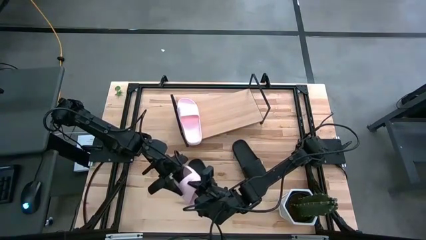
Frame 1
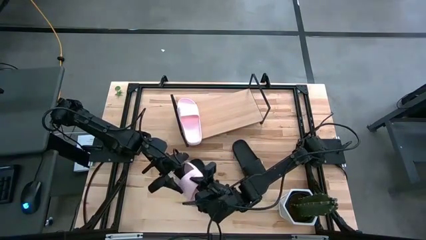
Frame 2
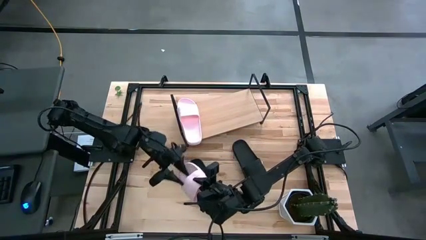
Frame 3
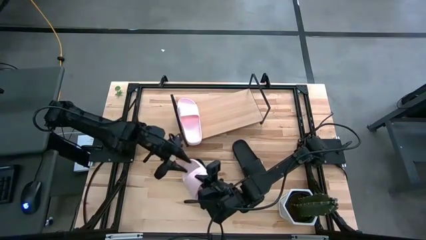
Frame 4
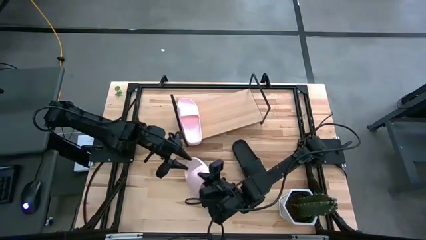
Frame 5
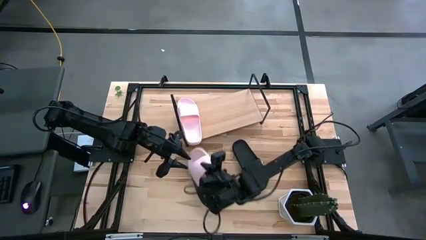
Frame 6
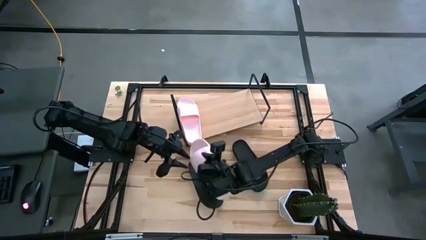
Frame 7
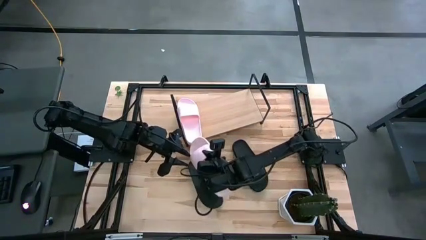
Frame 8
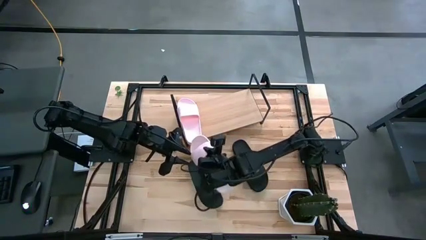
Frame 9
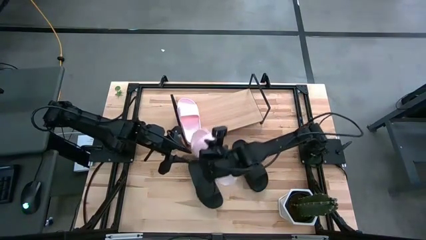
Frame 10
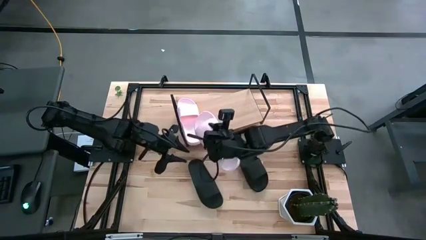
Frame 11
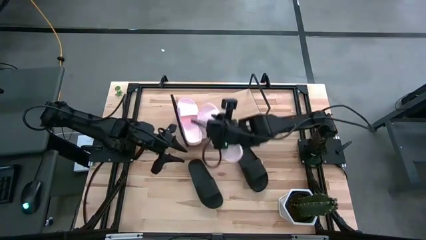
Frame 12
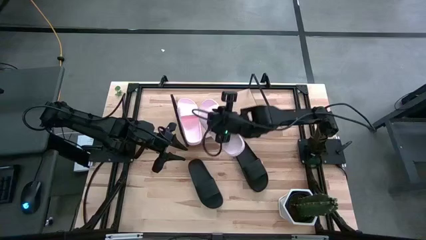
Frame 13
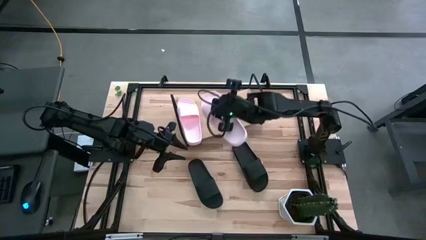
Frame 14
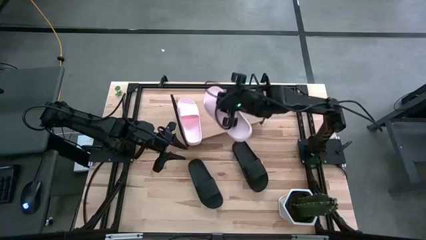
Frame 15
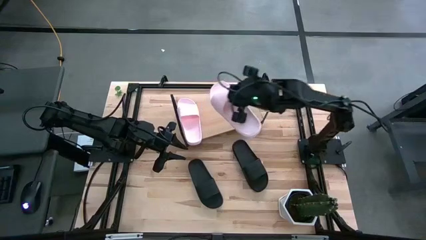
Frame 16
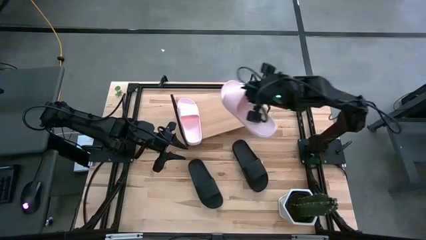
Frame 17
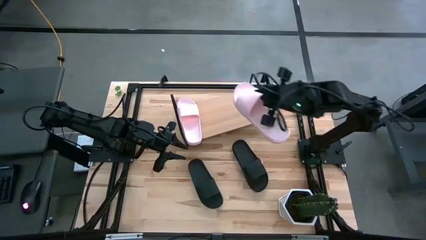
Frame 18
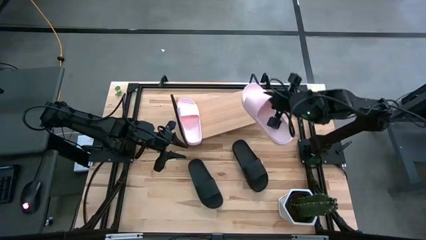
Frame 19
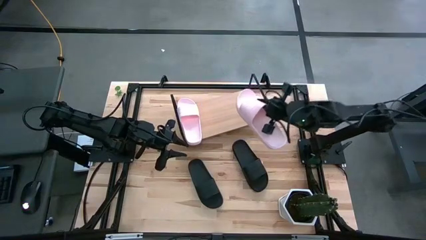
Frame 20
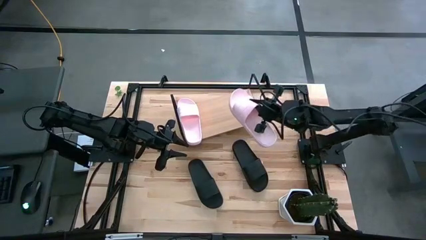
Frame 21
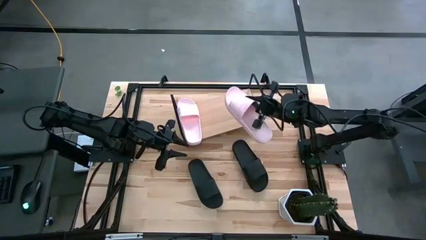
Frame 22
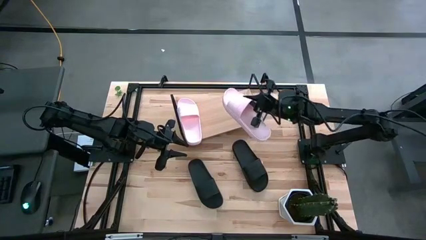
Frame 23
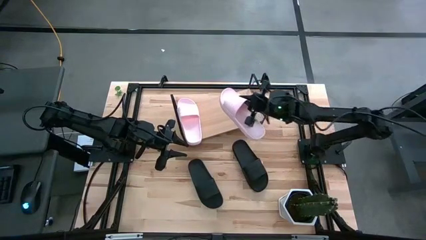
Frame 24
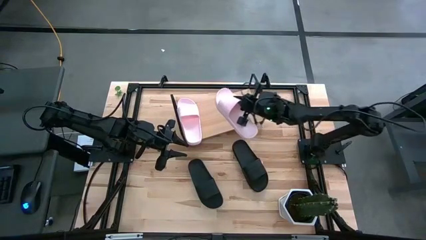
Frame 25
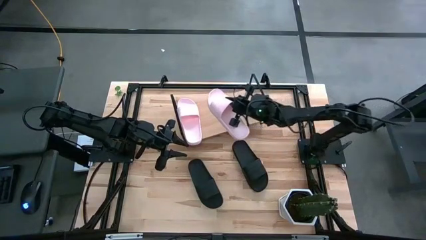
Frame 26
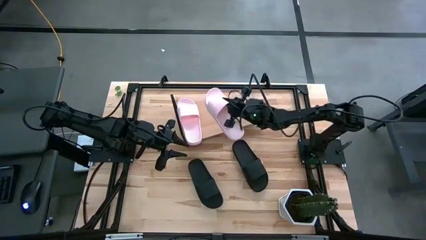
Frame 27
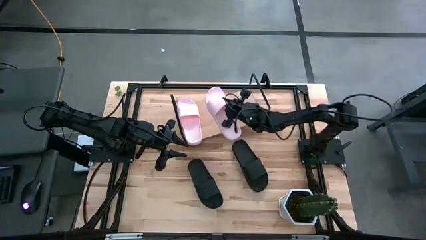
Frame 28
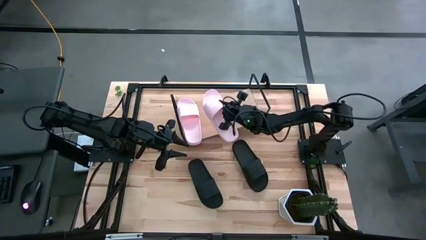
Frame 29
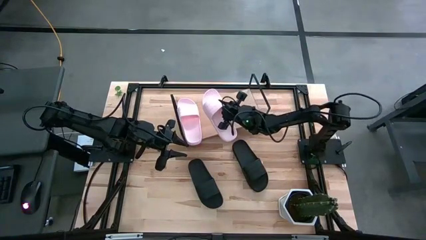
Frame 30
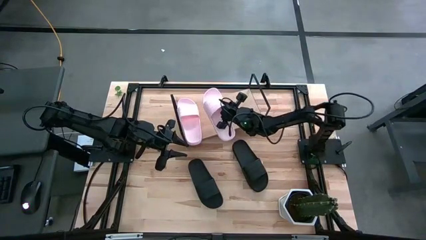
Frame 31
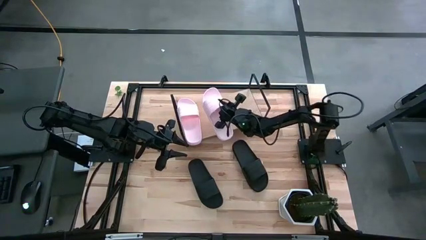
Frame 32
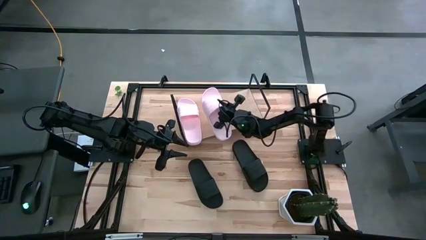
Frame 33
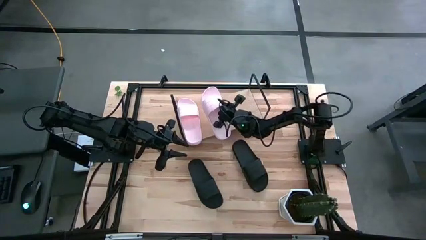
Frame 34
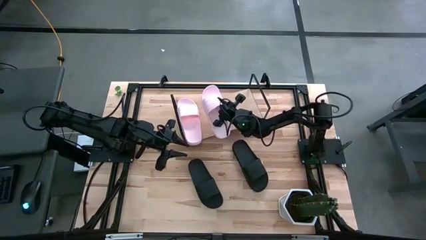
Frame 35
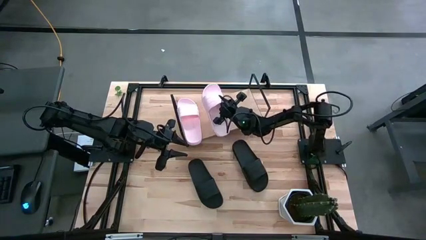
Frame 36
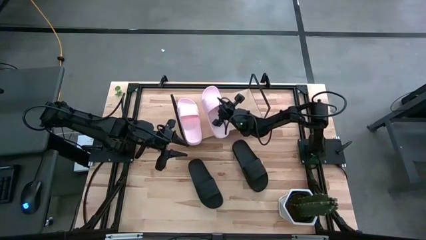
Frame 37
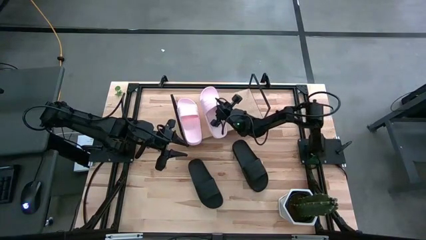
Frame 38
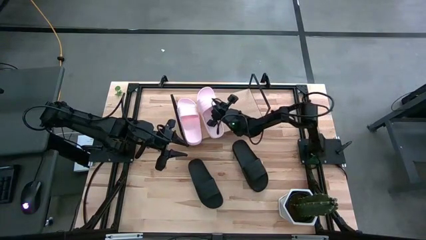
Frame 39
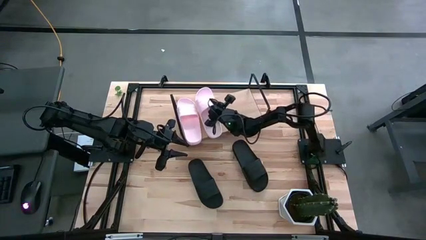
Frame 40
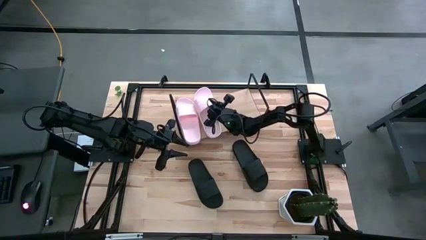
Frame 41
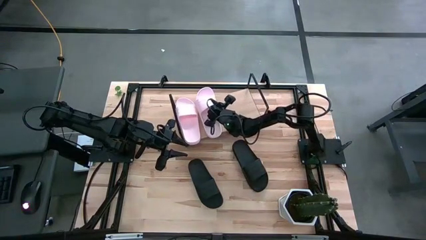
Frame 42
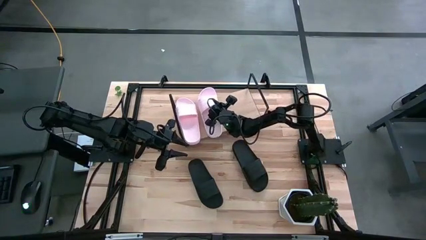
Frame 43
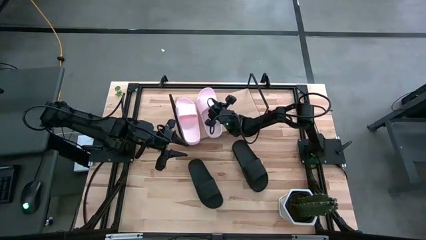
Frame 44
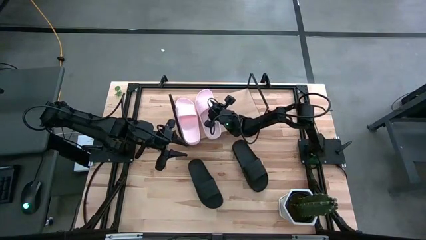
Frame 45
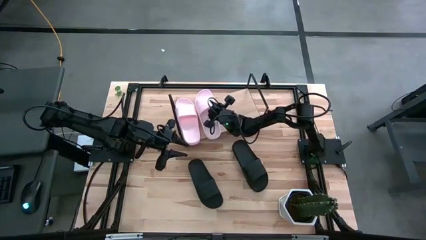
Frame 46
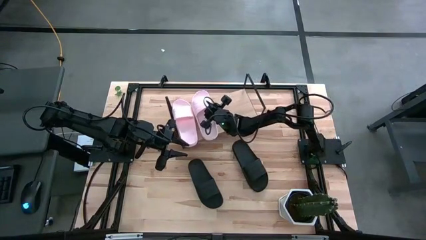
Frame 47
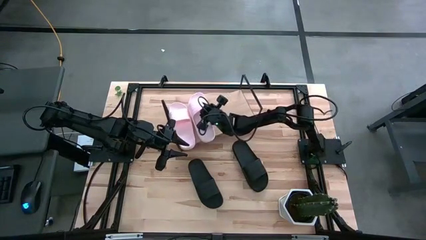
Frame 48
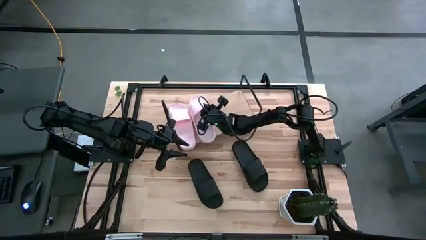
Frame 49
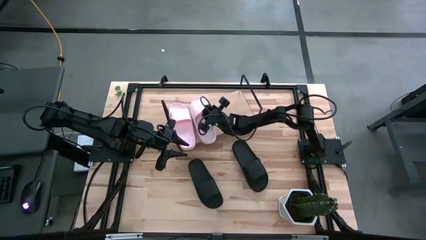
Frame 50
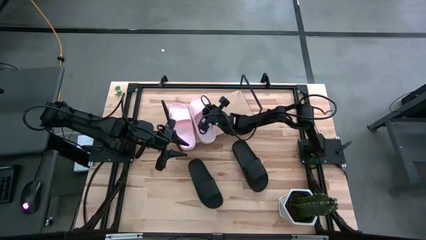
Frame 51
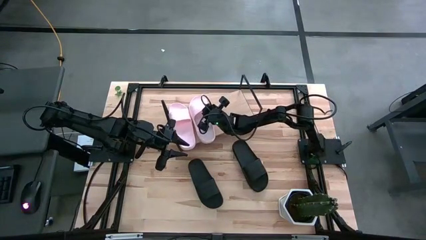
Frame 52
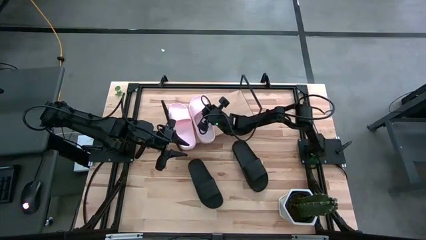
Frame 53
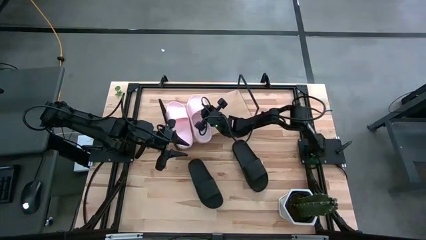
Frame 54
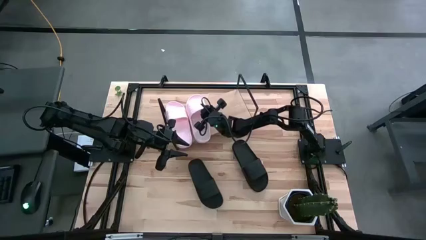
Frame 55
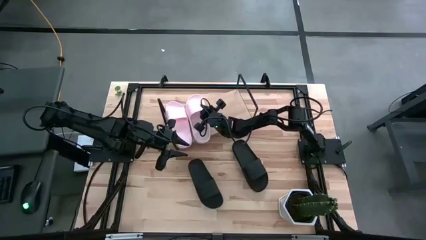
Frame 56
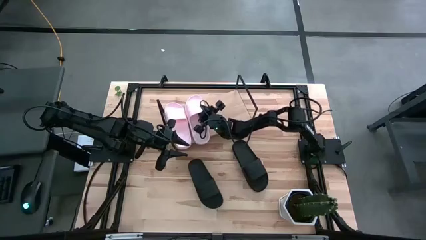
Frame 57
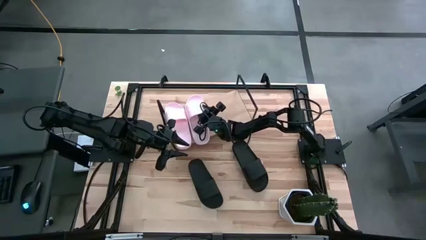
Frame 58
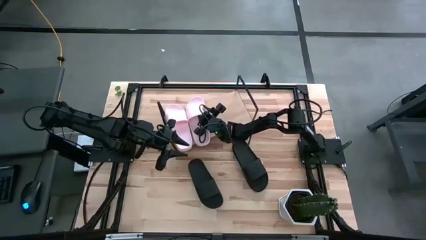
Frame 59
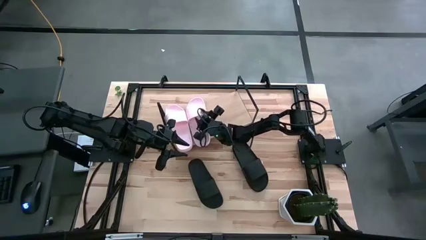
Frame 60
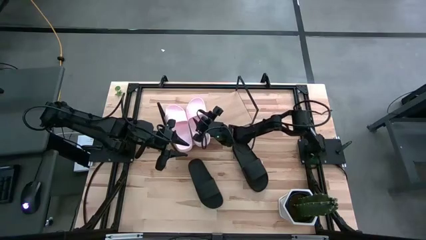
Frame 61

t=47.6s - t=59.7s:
Task: Pick and place slides into the shelf
Put the pink slide on the shelf
